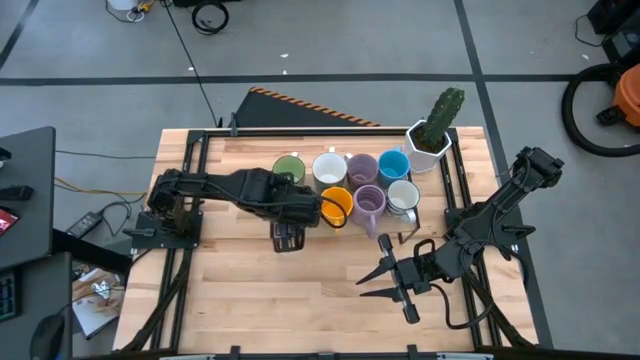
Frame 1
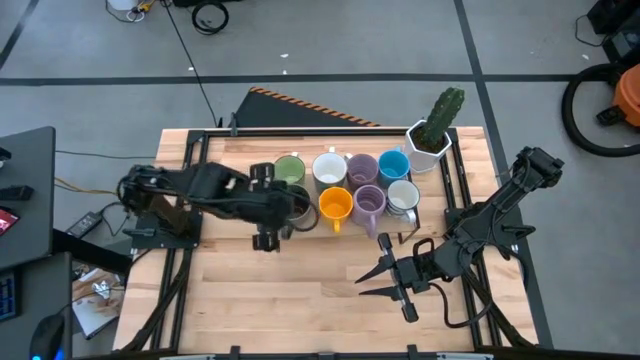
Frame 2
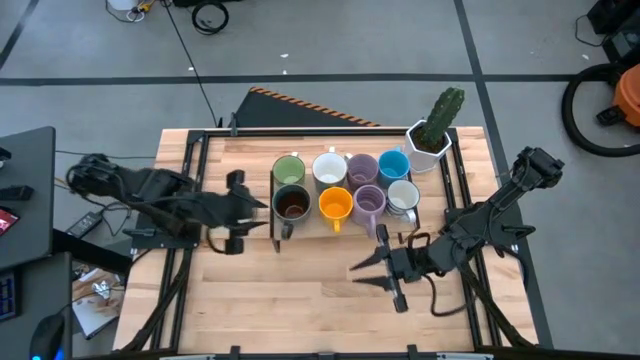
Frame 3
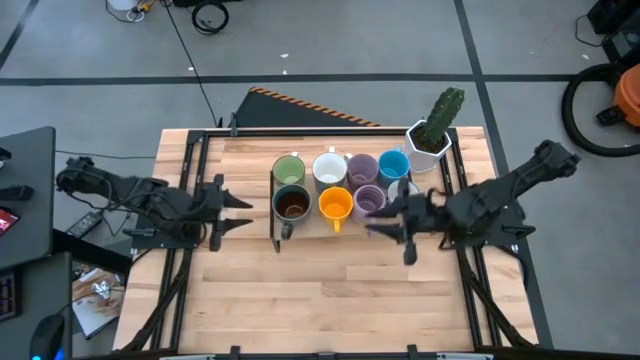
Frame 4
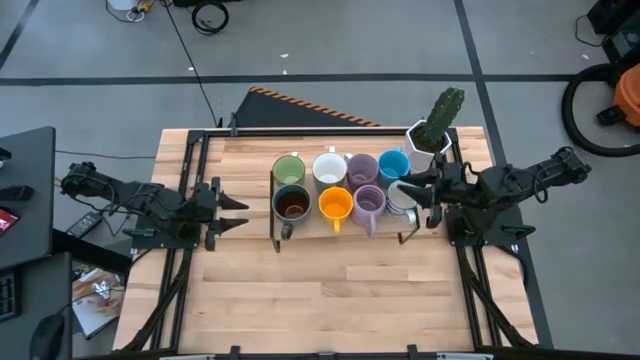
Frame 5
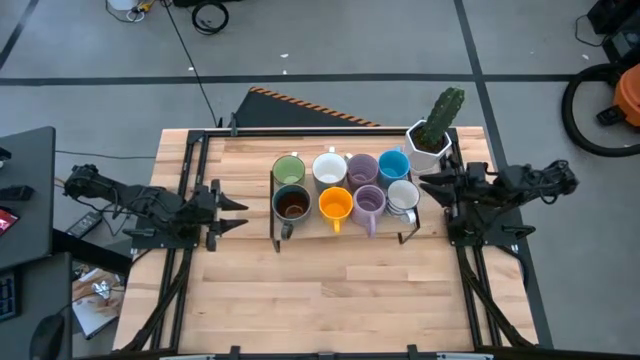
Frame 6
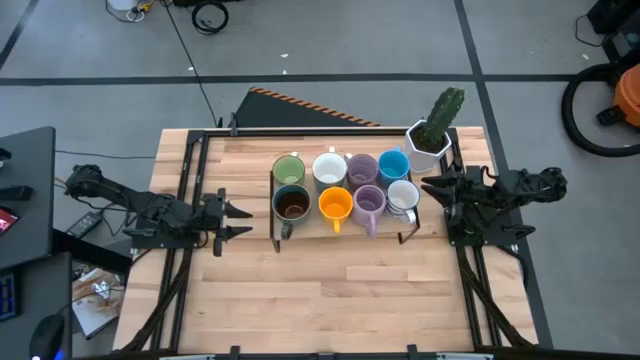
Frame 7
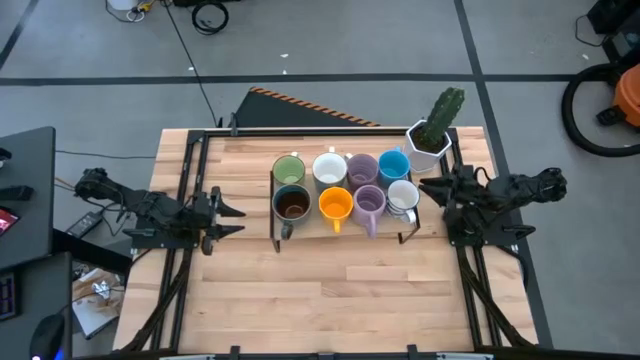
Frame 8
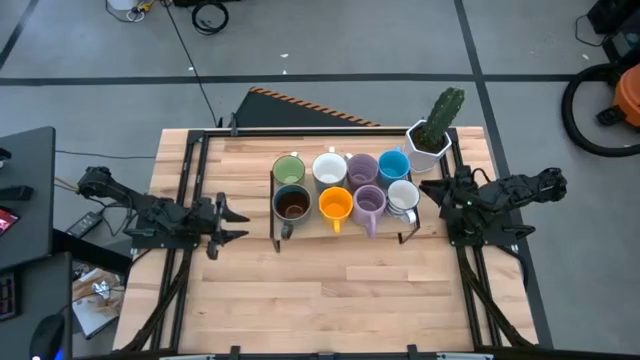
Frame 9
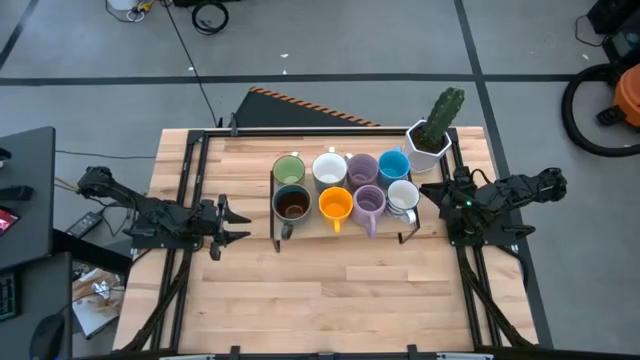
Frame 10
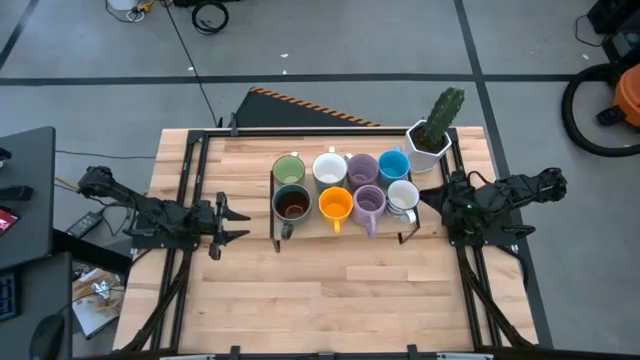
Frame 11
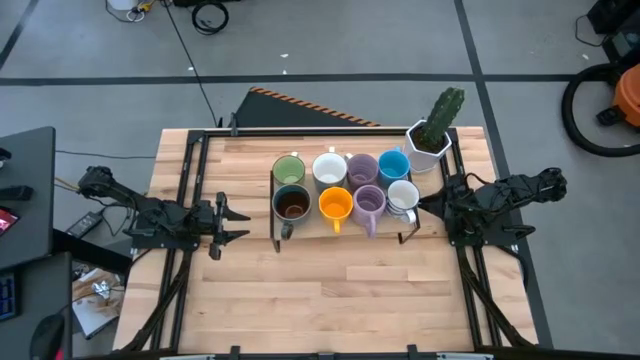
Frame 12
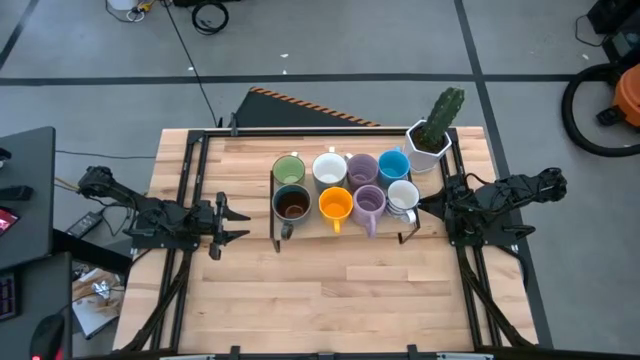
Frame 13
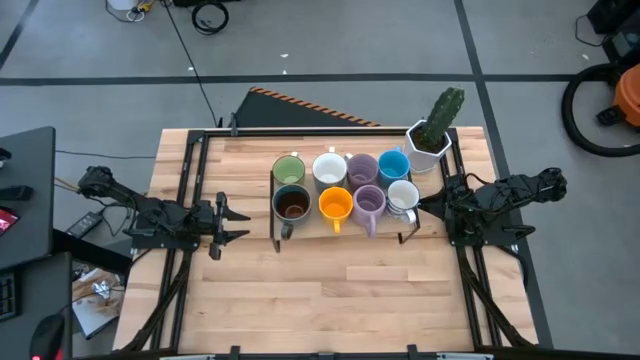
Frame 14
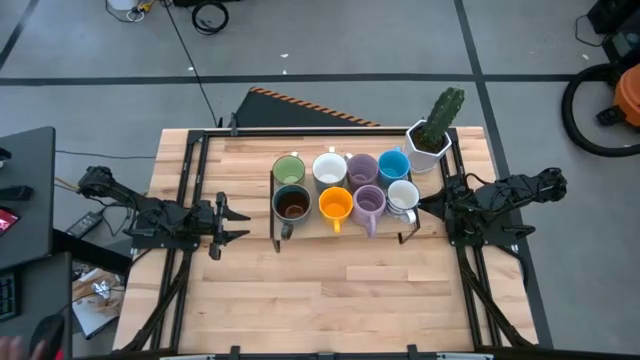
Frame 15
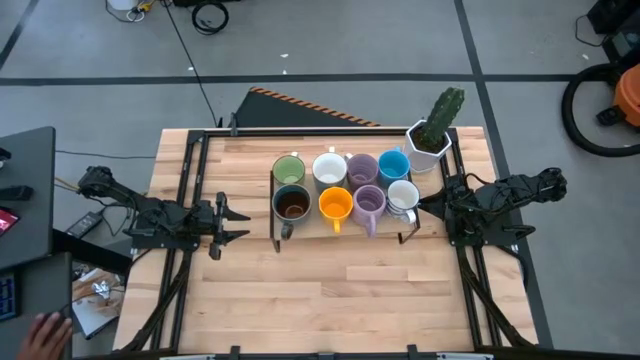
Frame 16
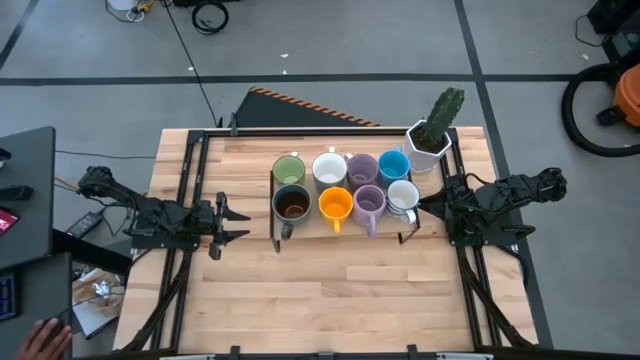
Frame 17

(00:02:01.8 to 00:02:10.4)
Task: Place coffee mugs
Return to Home Position

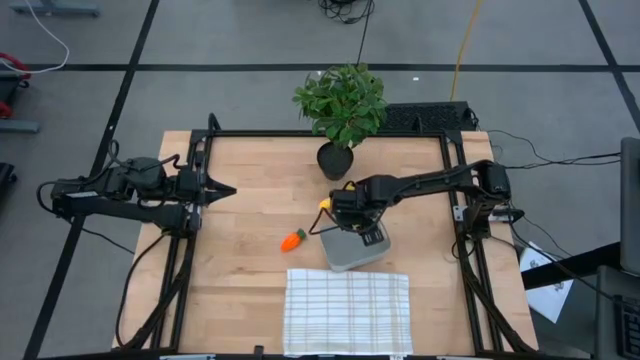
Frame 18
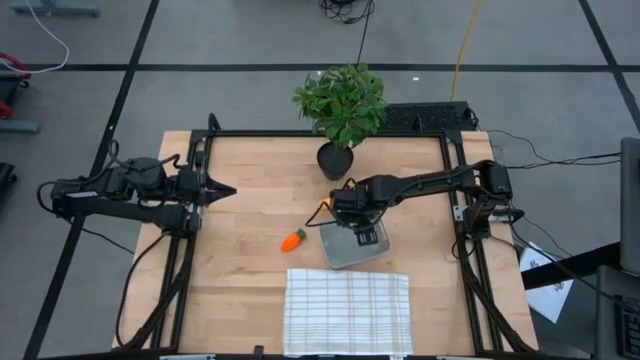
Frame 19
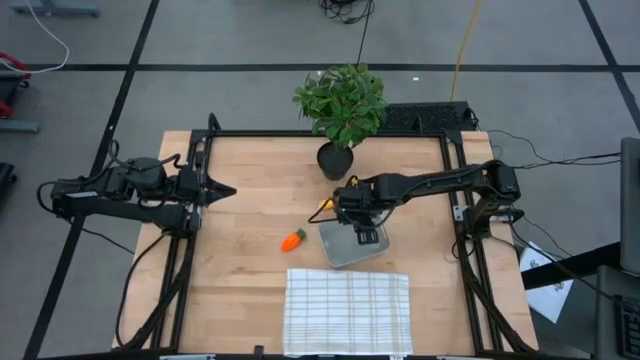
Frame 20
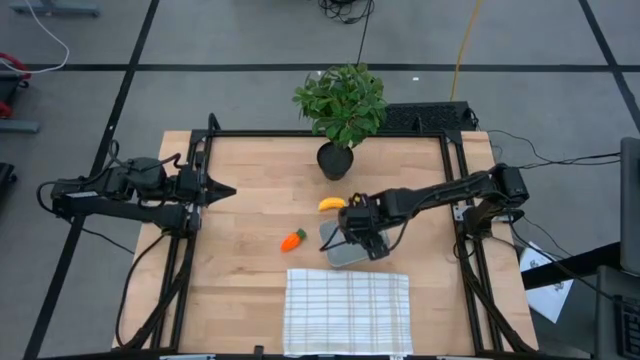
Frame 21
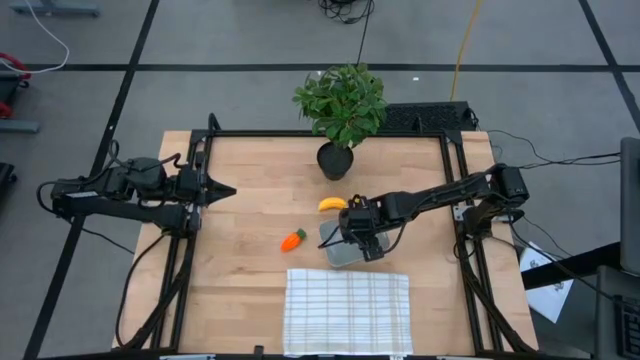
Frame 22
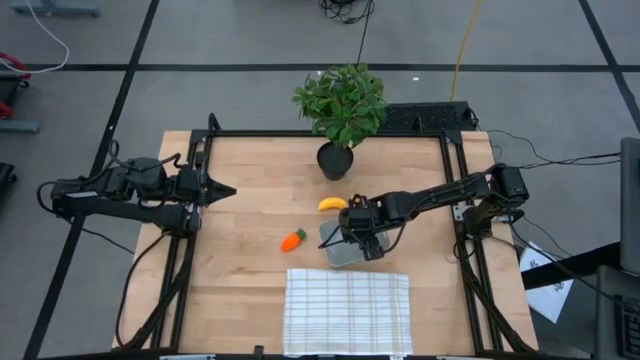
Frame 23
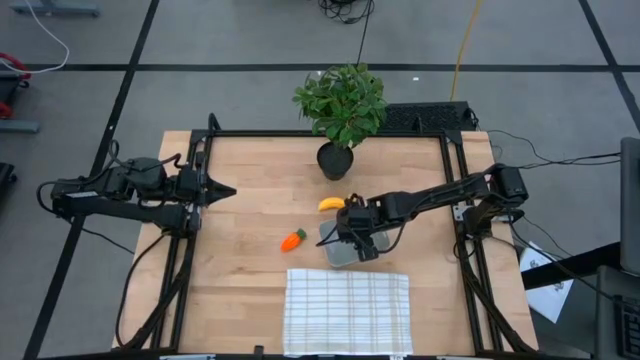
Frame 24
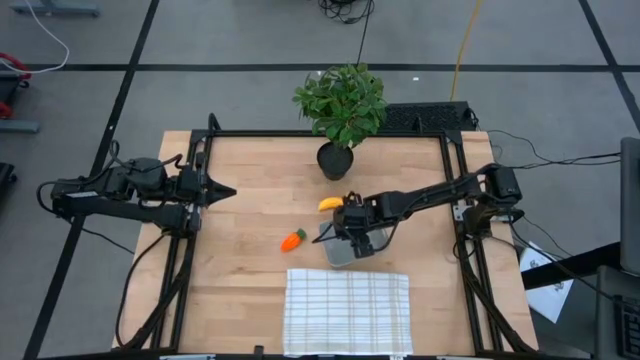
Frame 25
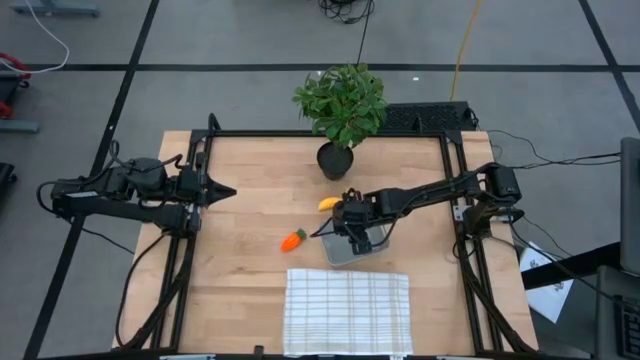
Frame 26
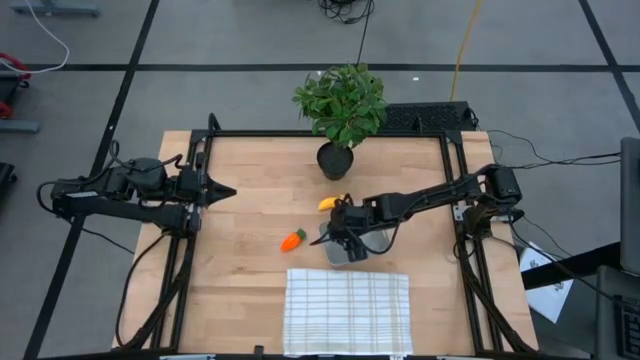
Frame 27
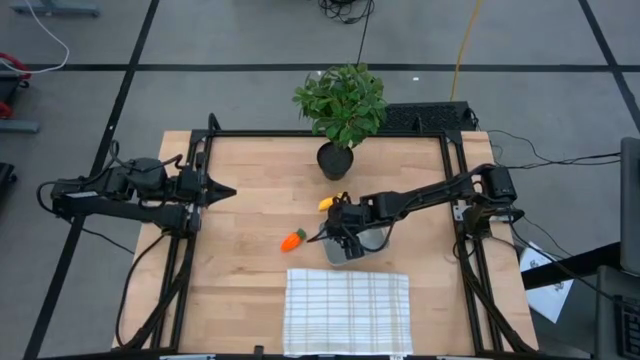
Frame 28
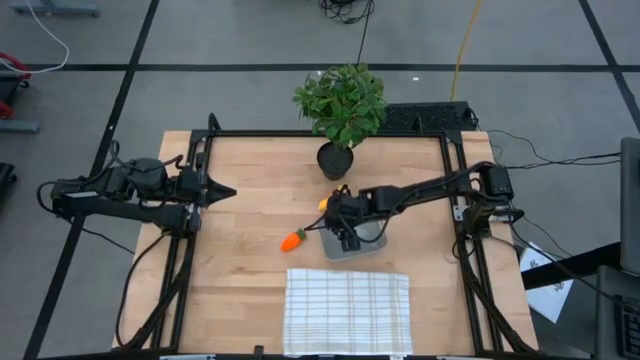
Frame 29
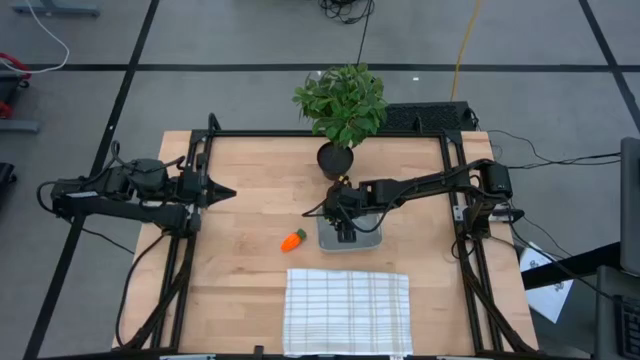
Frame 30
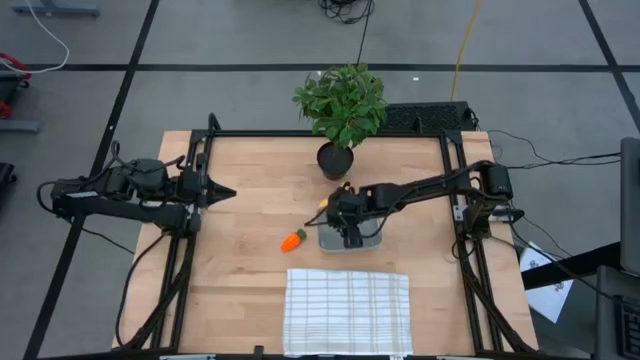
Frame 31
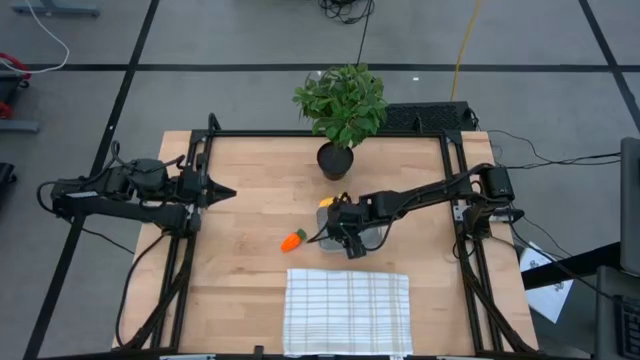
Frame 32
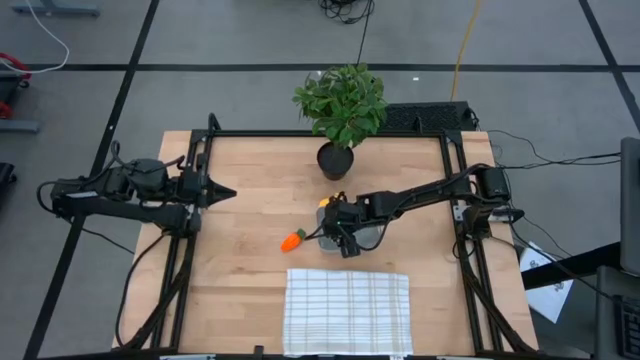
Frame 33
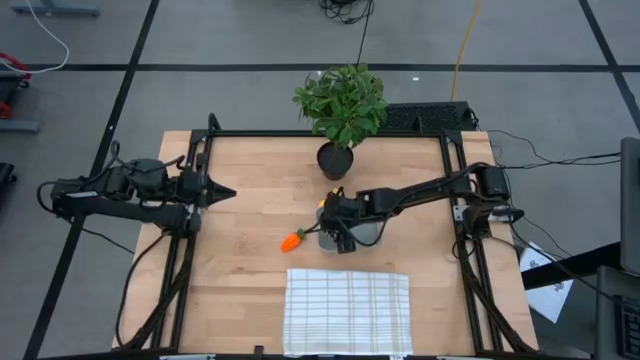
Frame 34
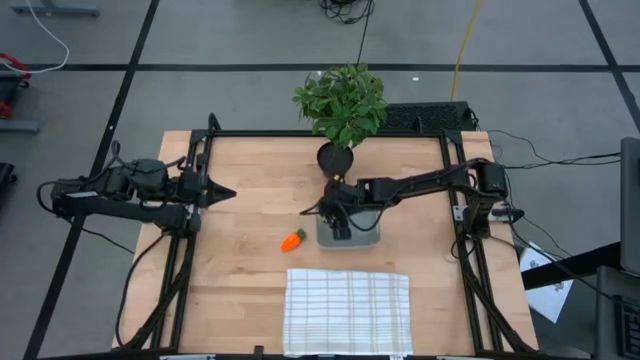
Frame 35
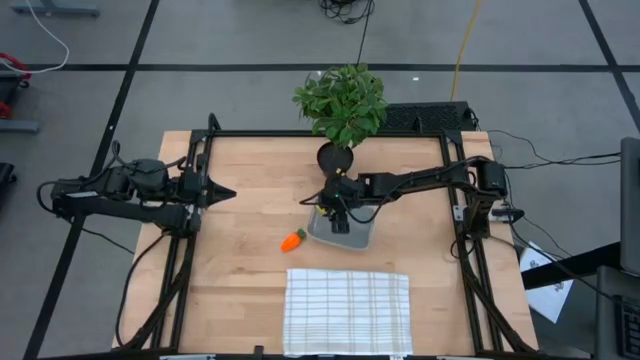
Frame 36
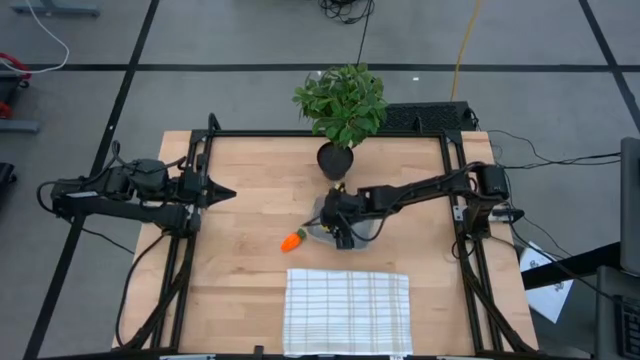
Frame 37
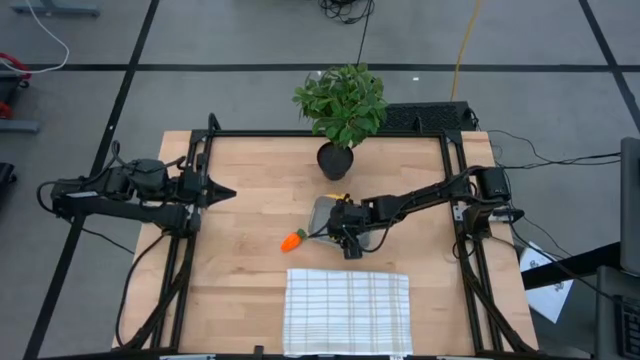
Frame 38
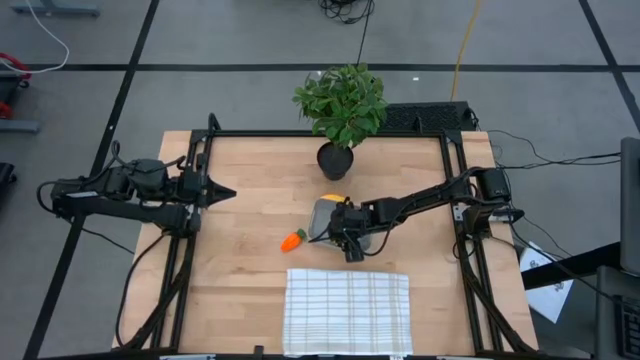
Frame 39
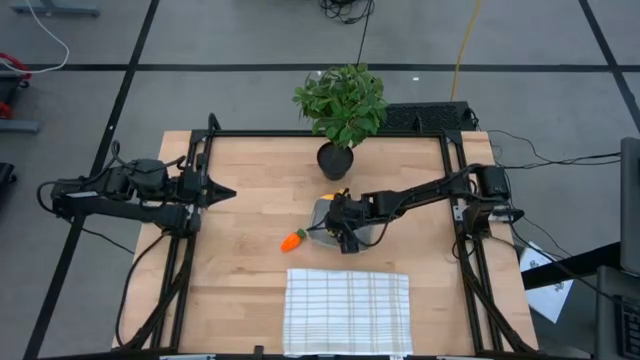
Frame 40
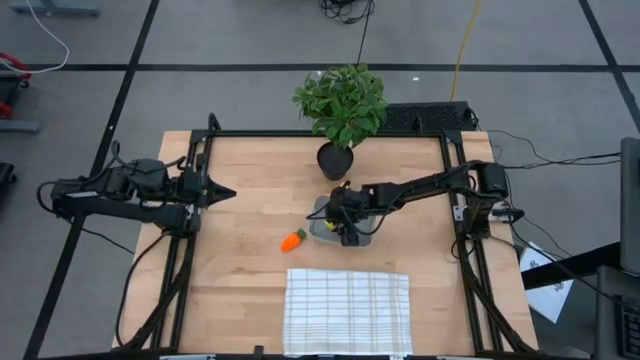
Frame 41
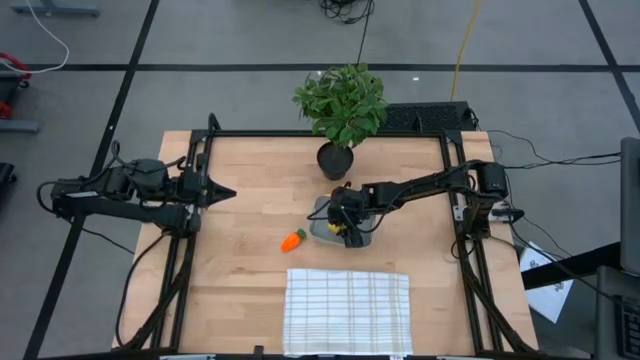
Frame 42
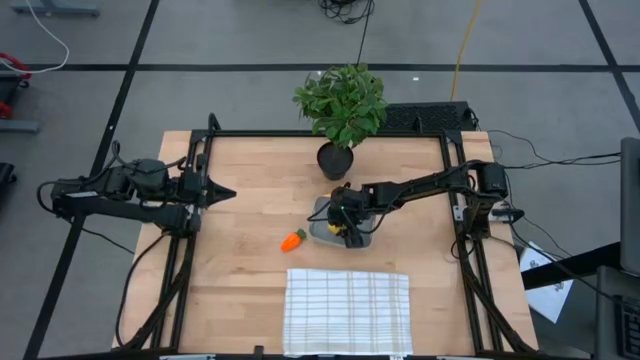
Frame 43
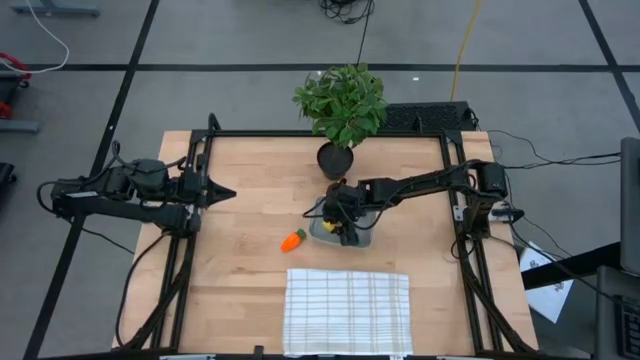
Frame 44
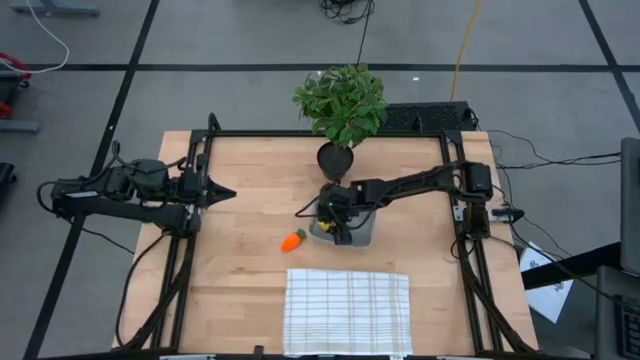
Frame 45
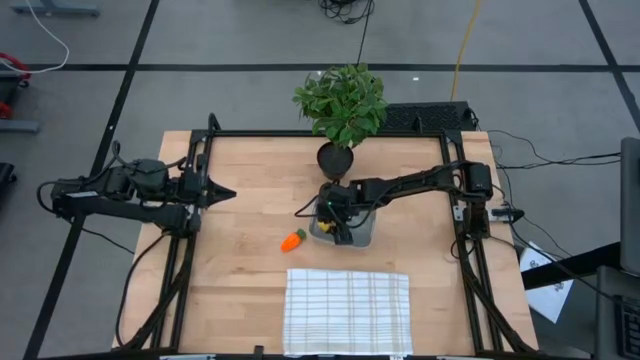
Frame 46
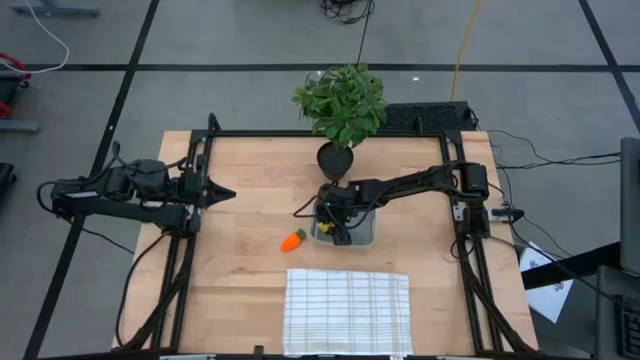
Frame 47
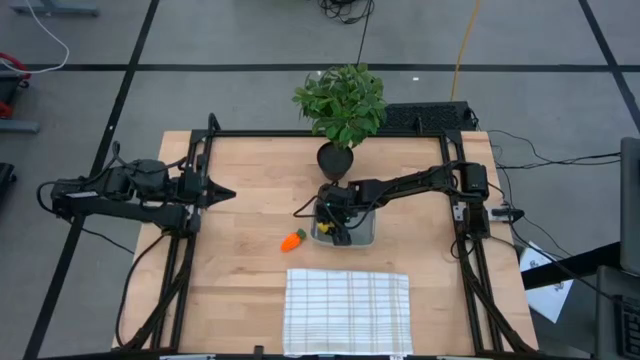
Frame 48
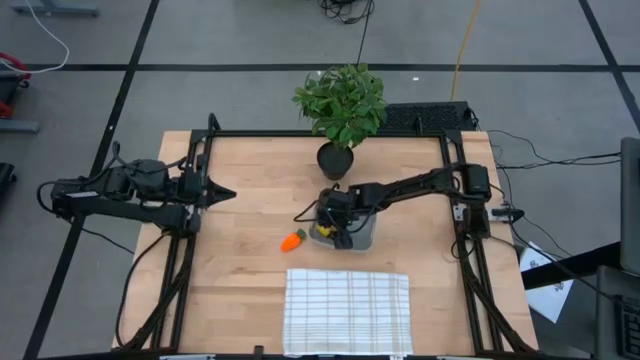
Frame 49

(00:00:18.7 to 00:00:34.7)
Task: Pick and placing Produce into tupperware
Put the yellow lemon into the gray bin
